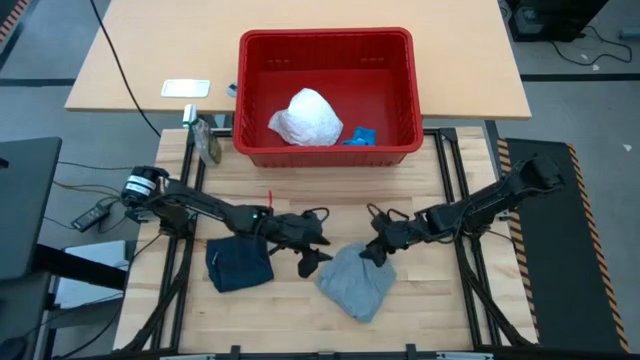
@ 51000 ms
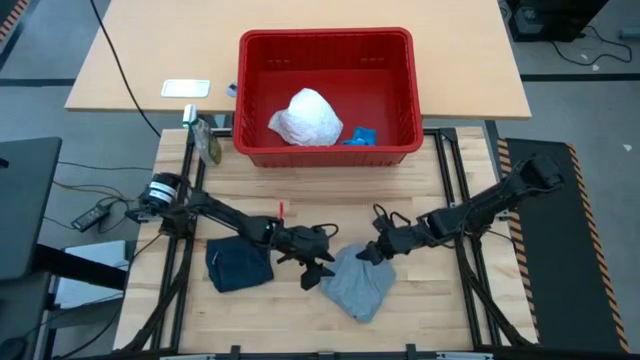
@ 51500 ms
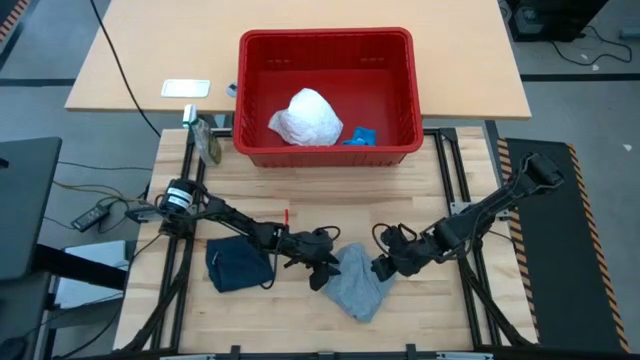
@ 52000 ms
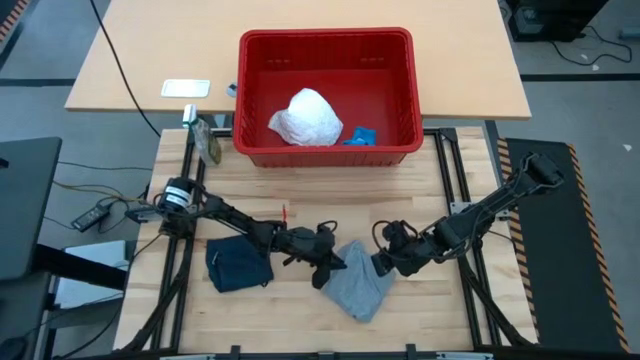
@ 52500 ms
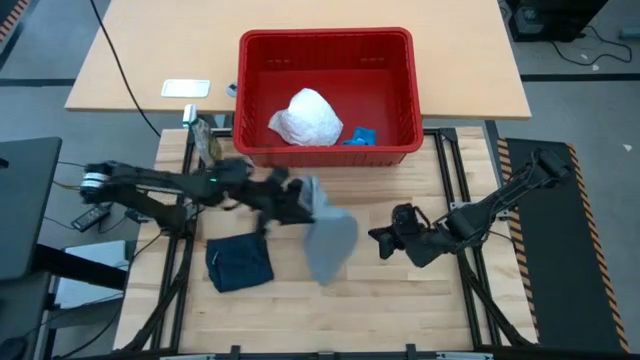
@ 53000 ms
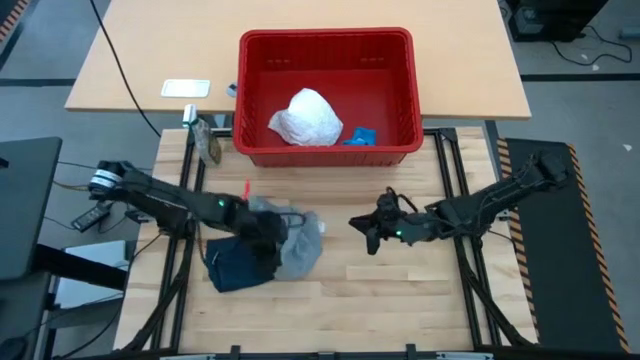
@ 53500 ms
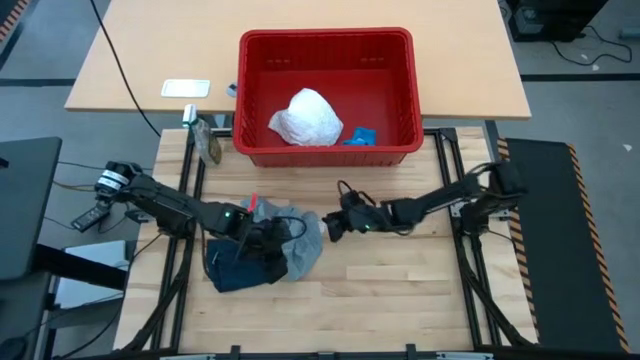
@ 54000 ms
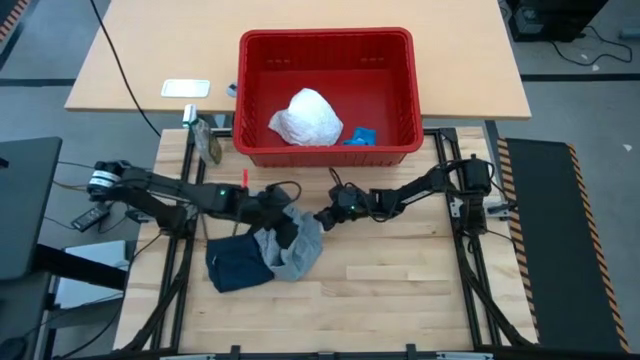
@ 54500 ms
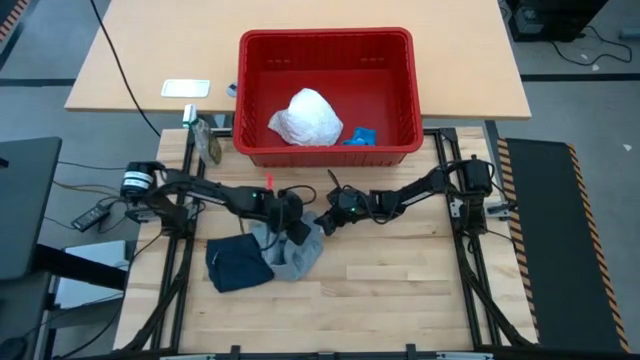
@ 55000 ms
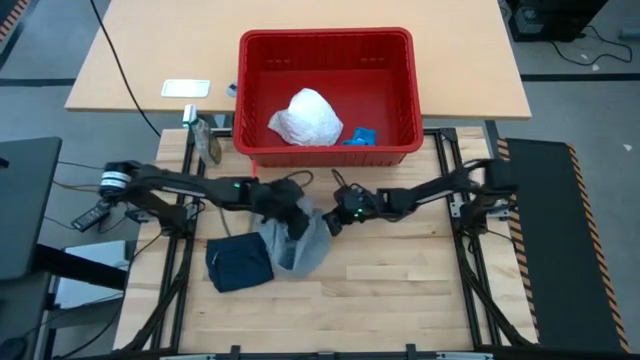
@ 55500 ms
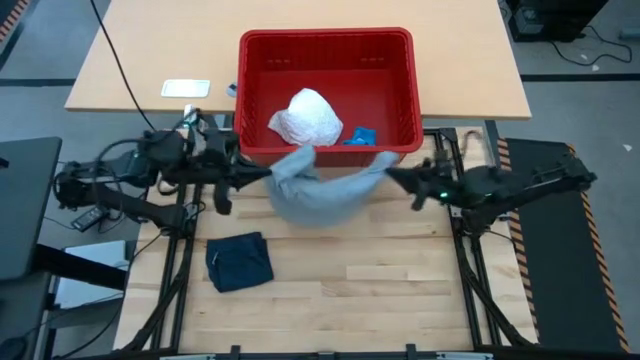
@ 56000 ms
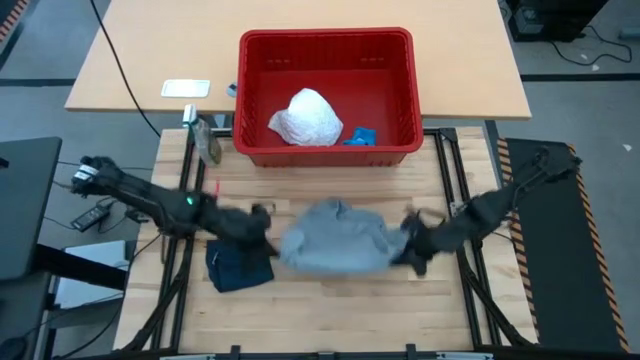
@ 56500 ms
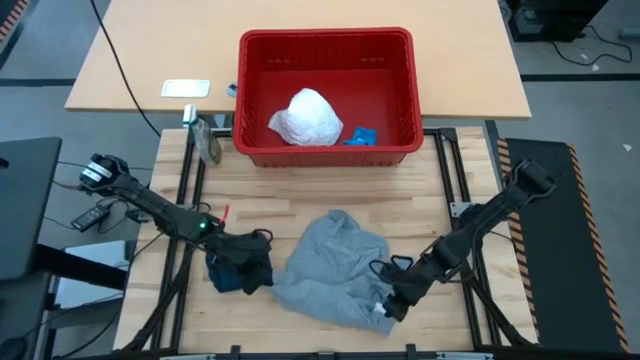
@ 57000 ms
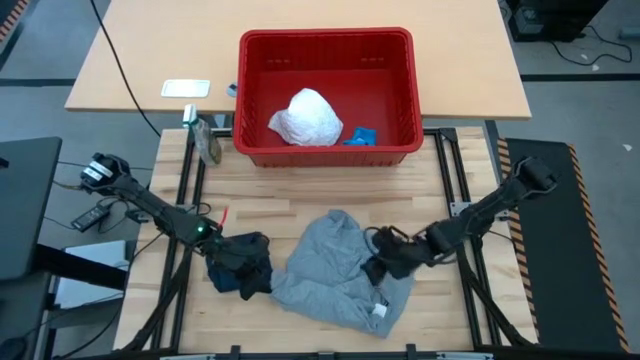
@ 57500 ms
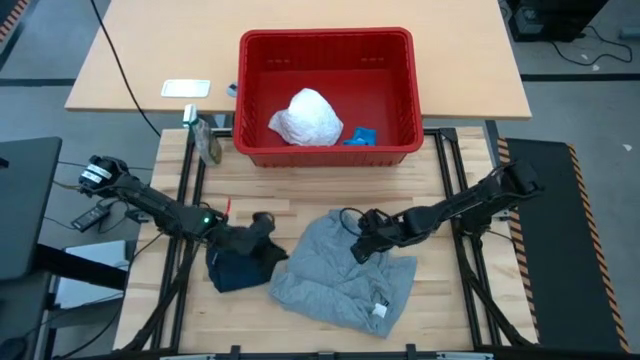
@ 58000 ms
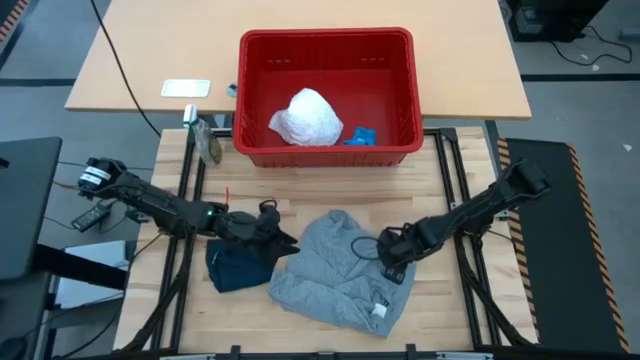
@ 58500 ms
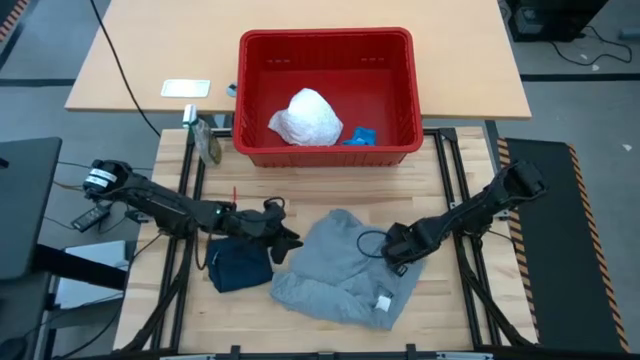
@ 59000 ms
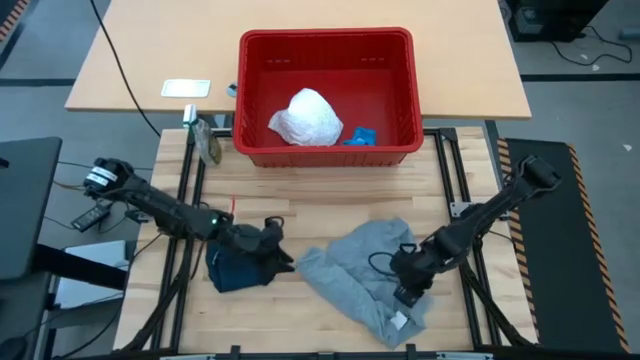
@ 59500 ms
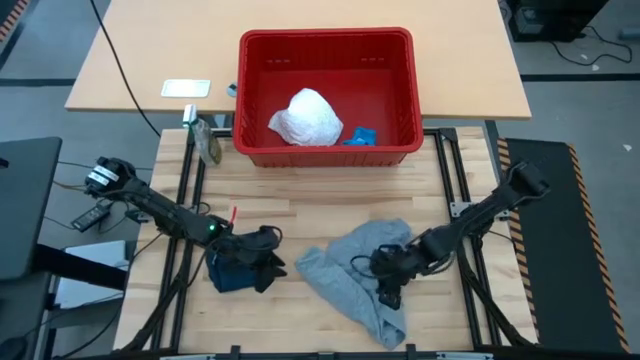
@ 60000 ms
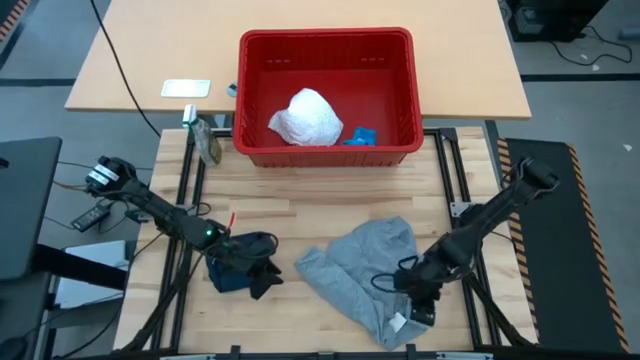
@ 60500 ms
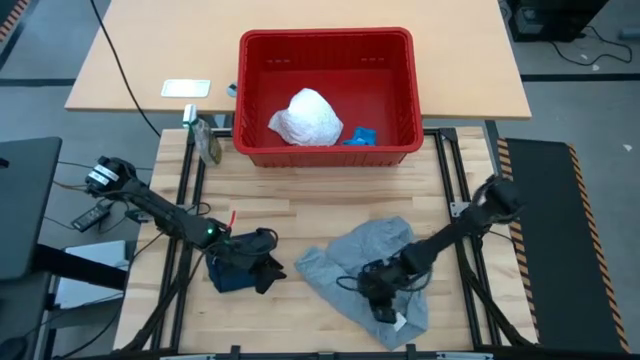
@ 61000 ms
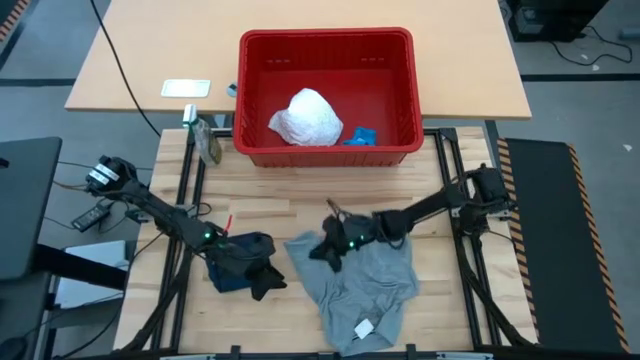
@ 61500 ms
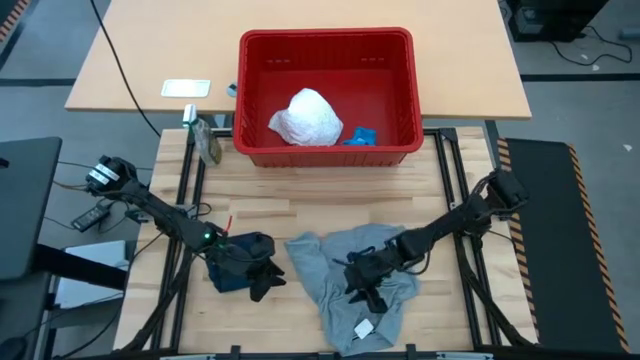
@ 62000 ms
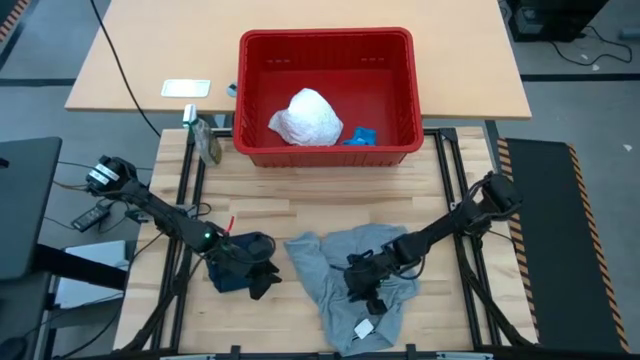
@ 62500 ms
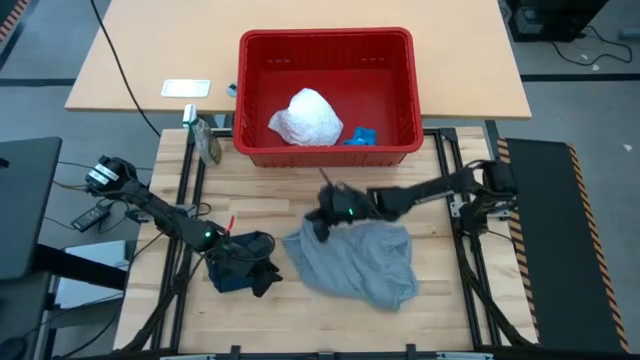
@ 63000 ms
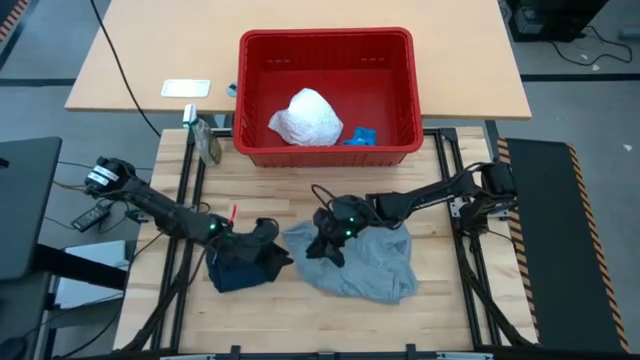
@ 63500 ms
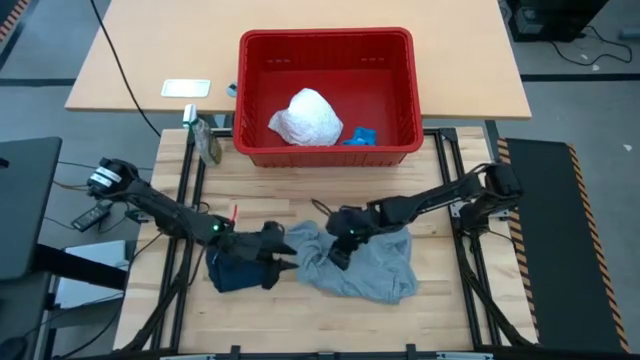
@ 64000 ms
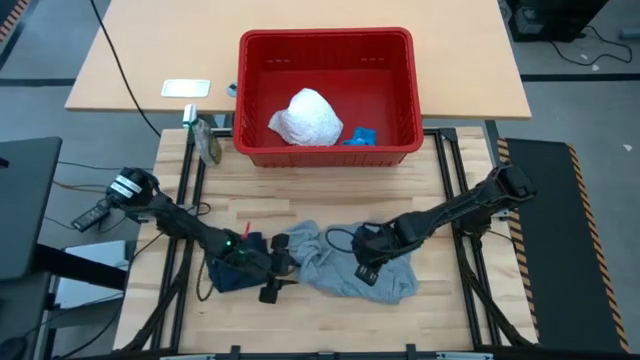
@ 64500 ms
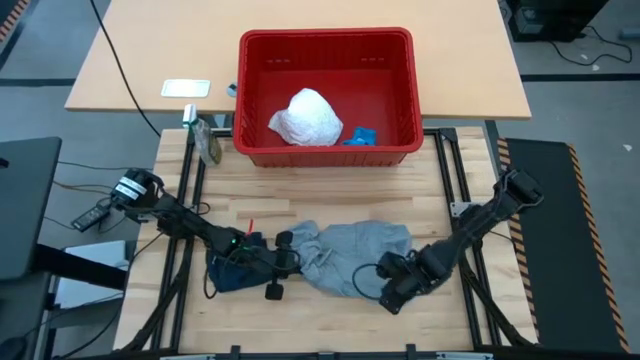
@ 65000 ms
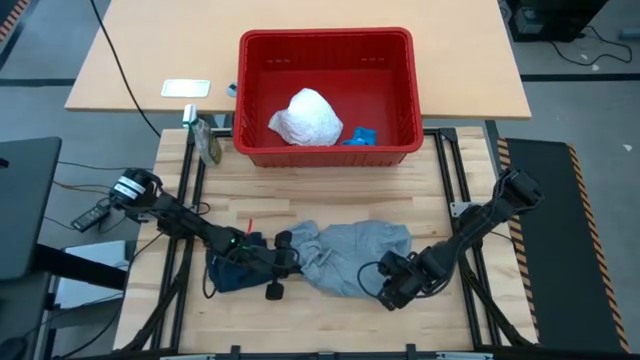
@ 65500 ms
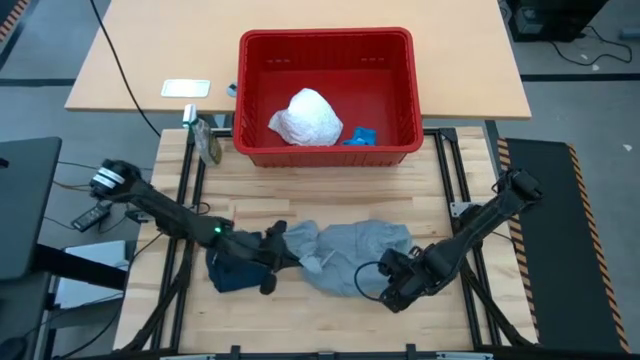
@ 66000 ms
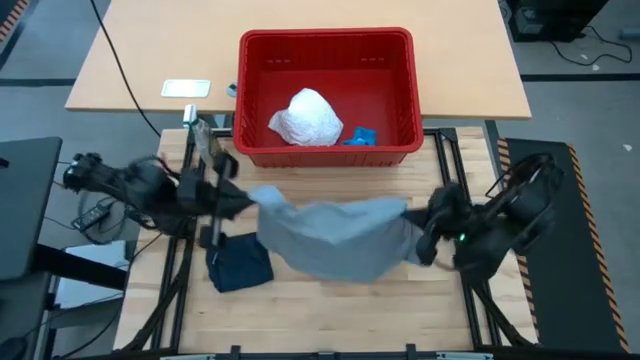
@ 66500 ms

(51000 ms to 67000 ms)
Task: Fold laundry
Fold the gray shirt

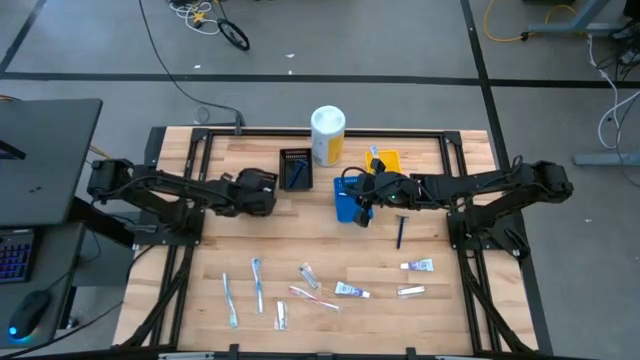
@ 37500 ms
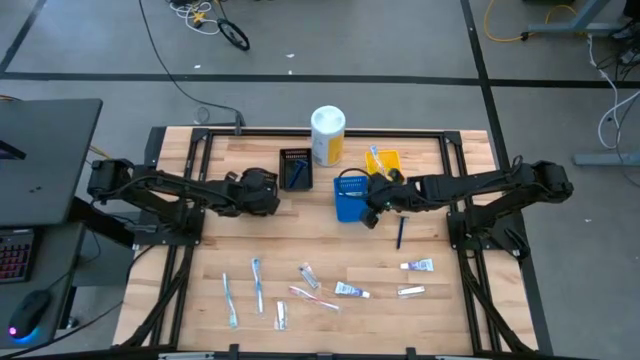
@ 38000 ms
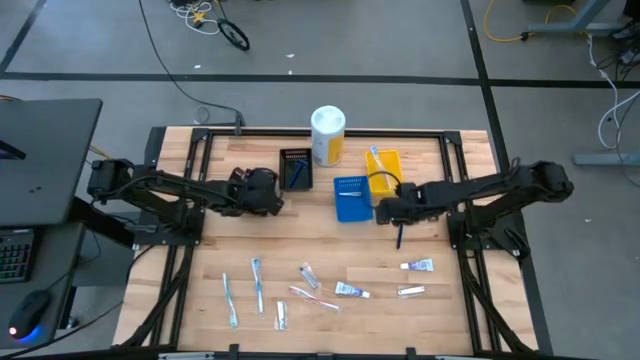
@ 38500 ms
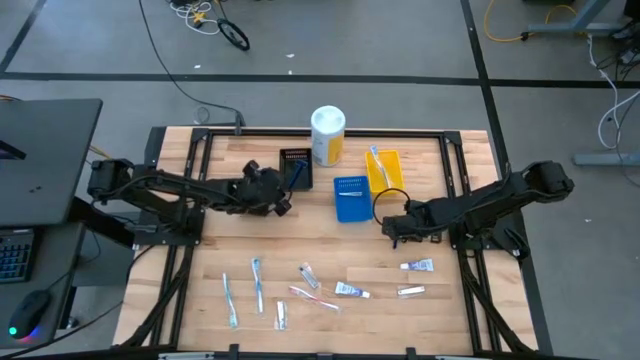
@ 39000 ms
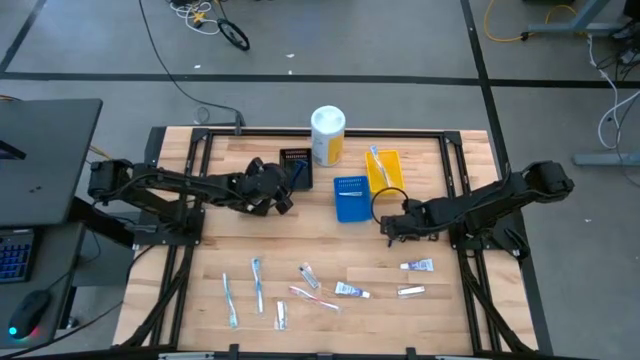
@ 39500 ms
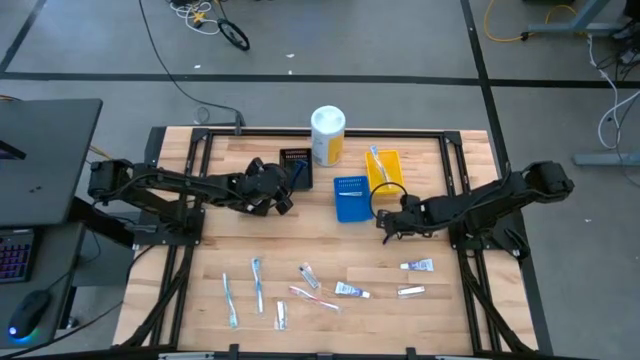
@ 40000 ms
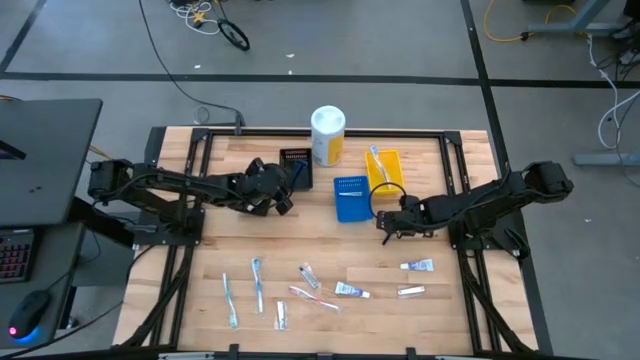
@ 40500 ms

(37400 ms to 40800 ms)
Task: Pick & Place Travel size toiletries
Put the blue razor into the right black bin
